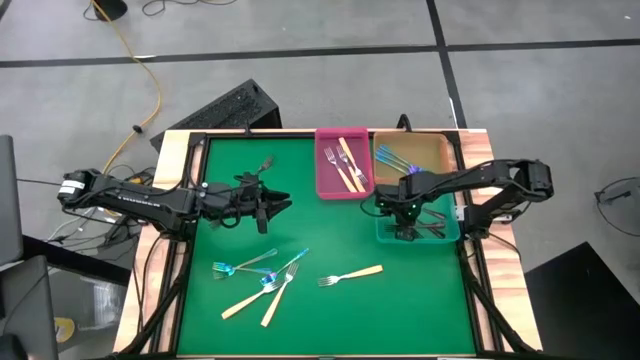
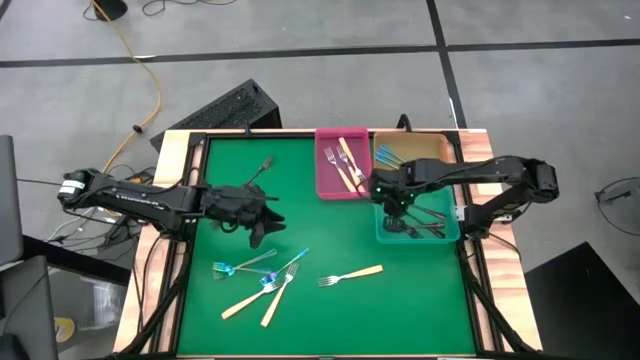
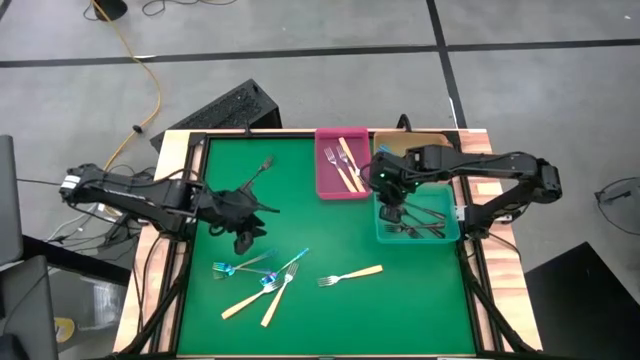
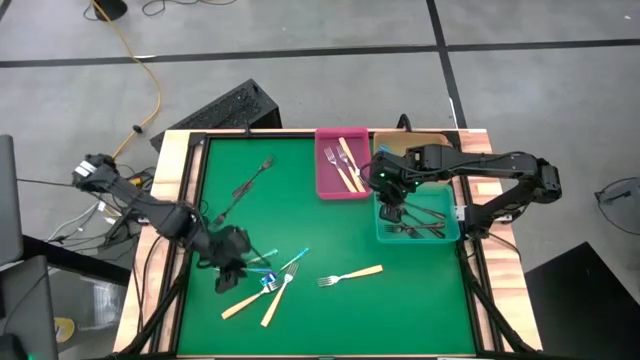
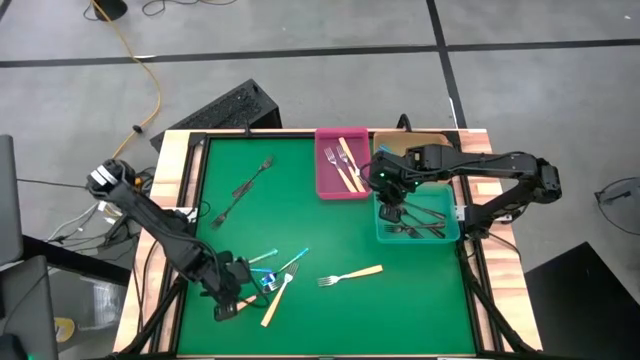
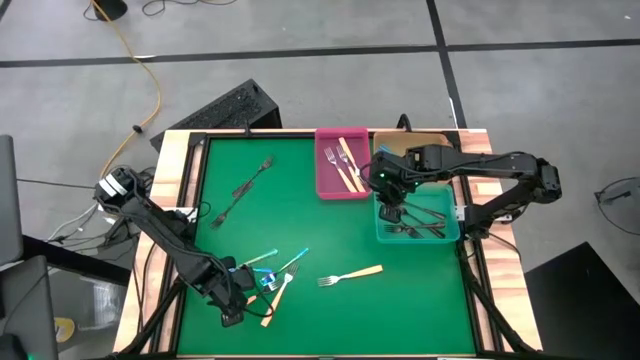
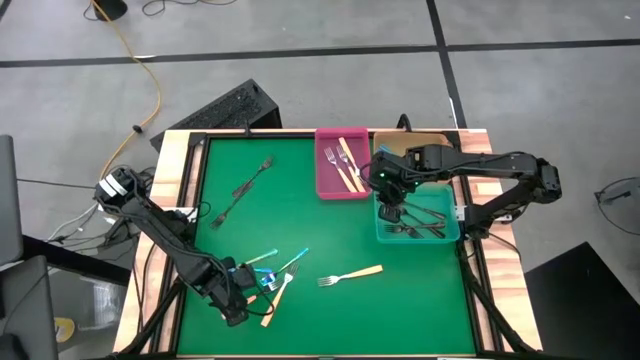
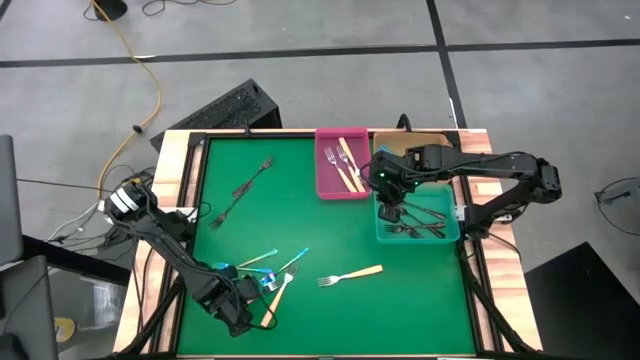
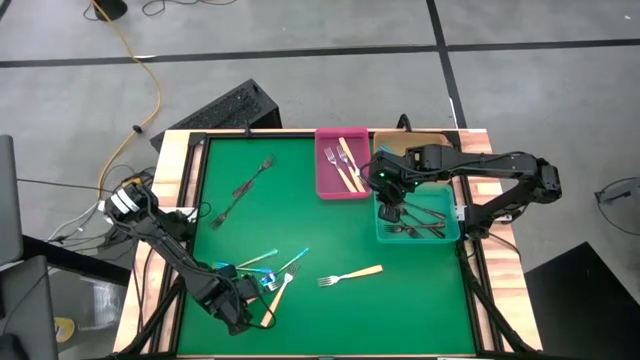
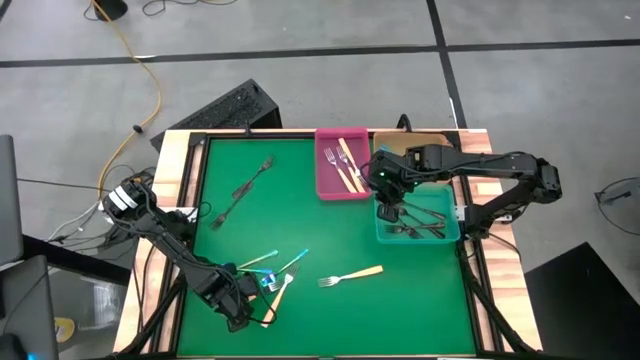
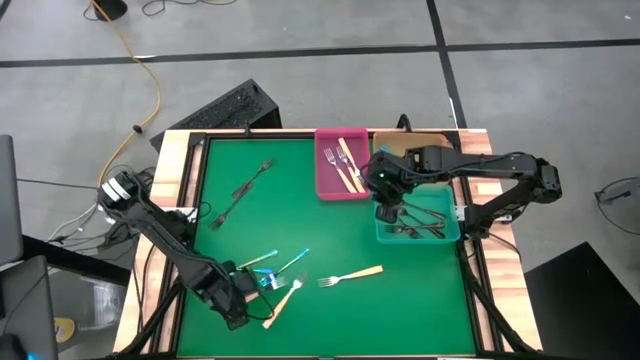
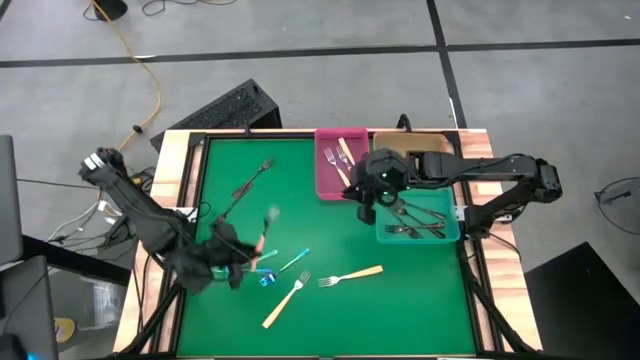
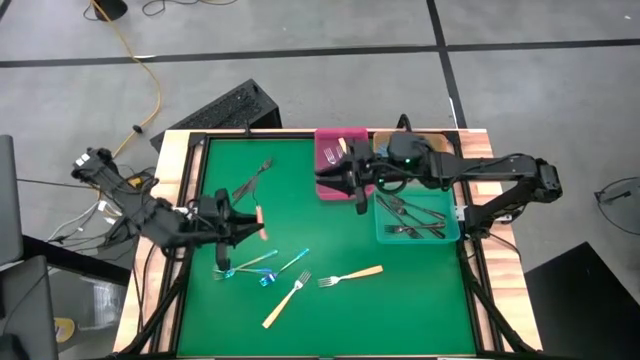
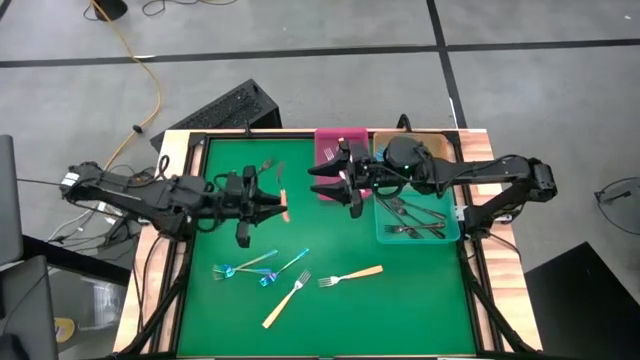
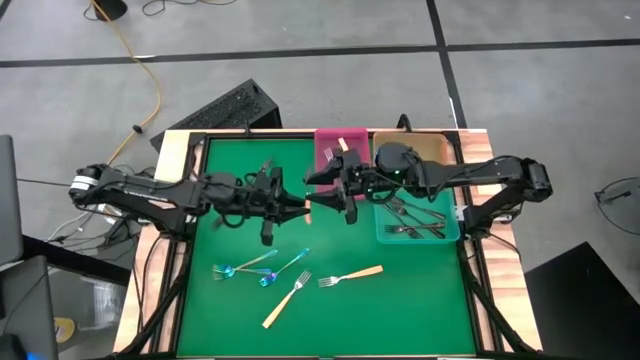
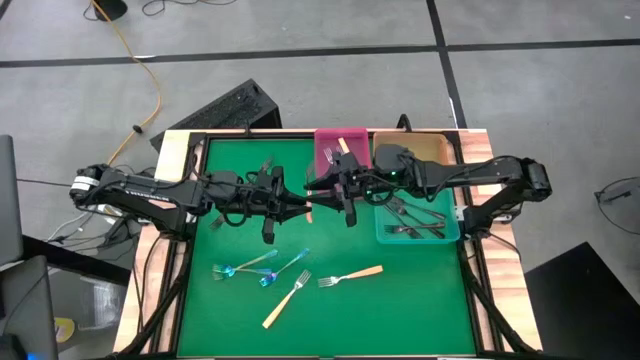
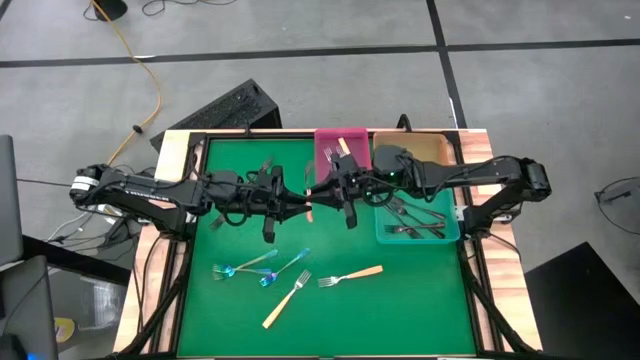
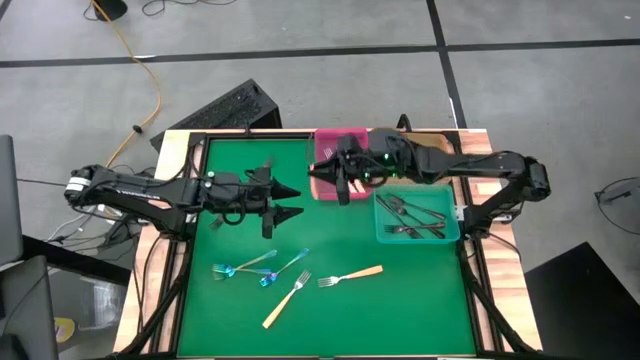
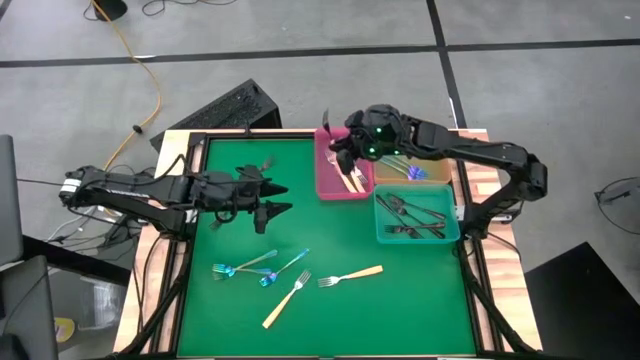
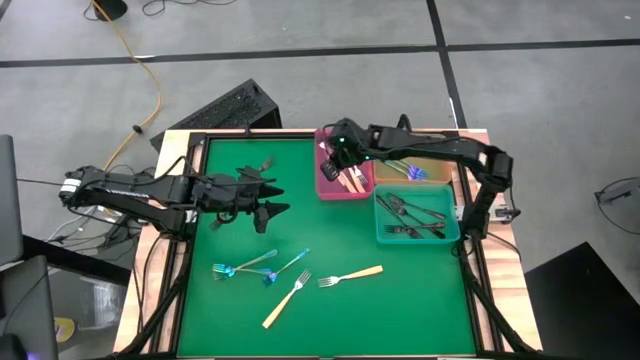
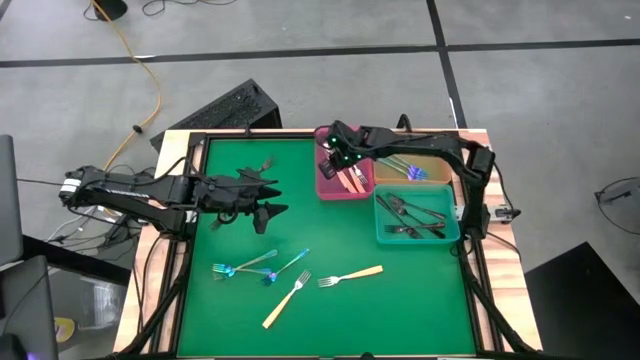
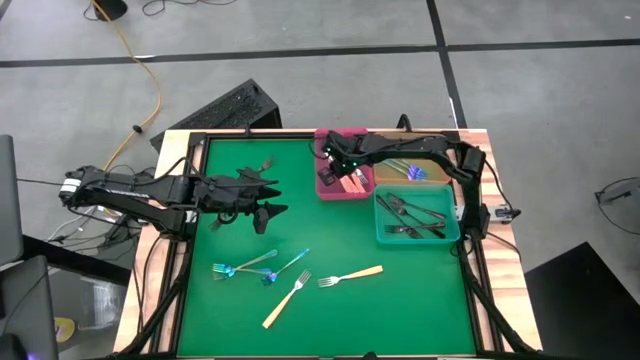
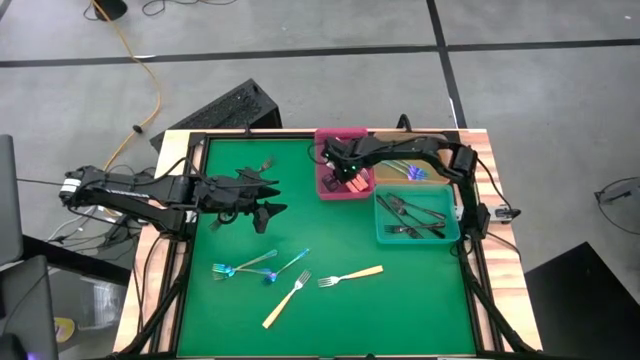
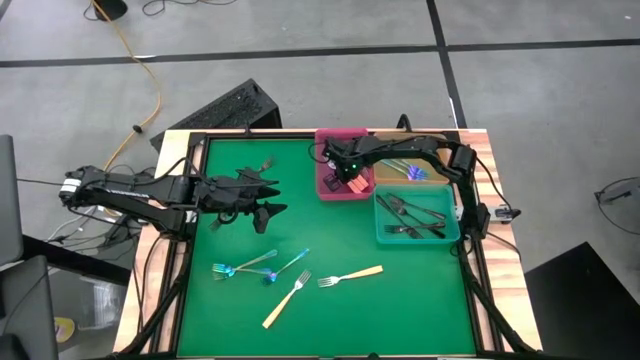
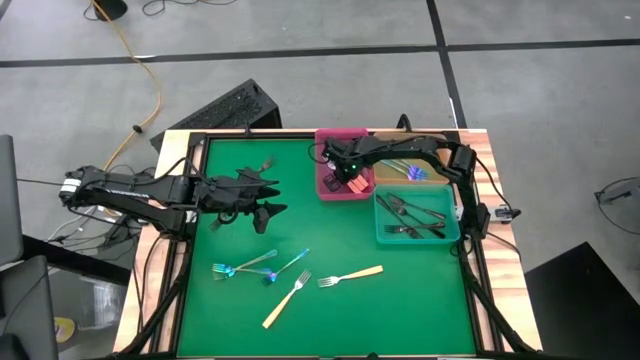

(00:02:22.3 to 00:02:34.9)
Task: Sort silverware by color (type)
Put the yellow fork into the pink bin

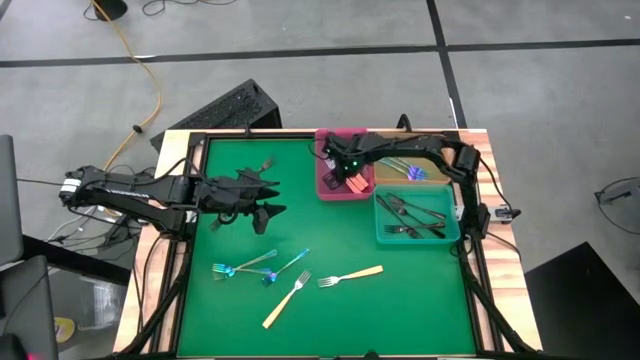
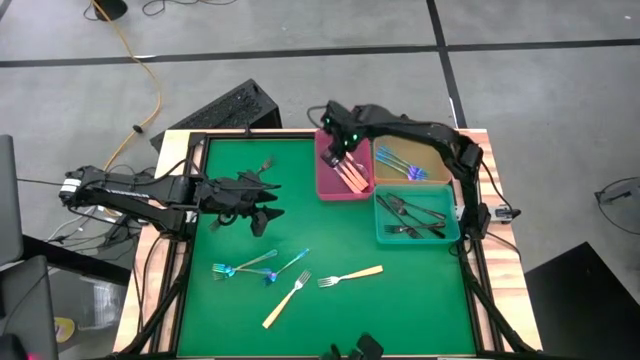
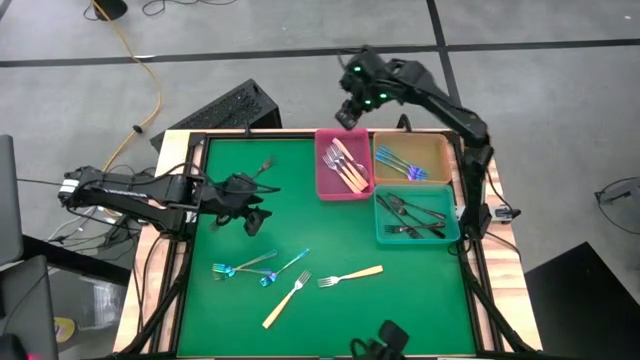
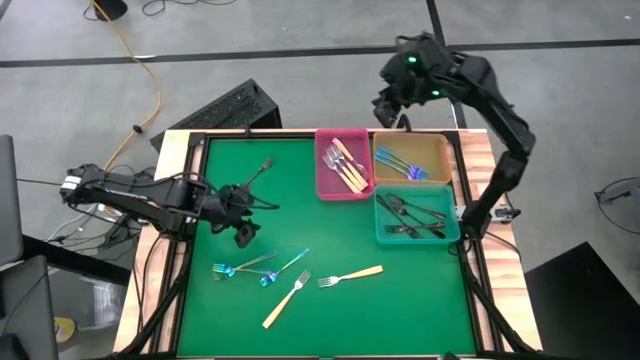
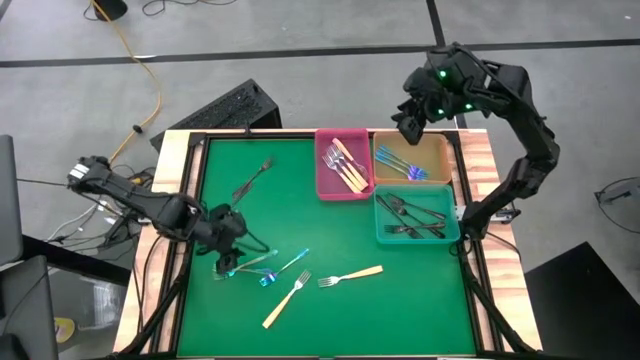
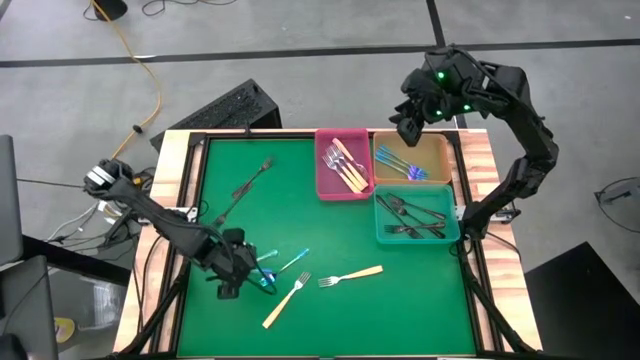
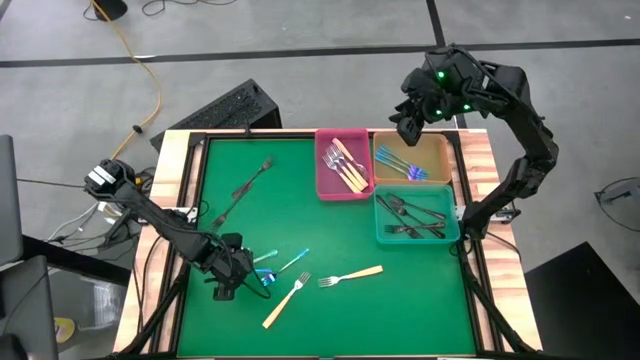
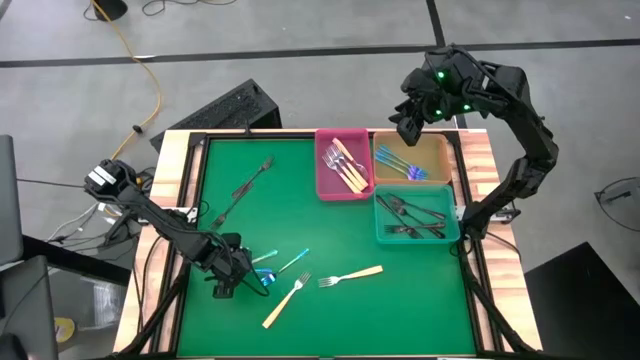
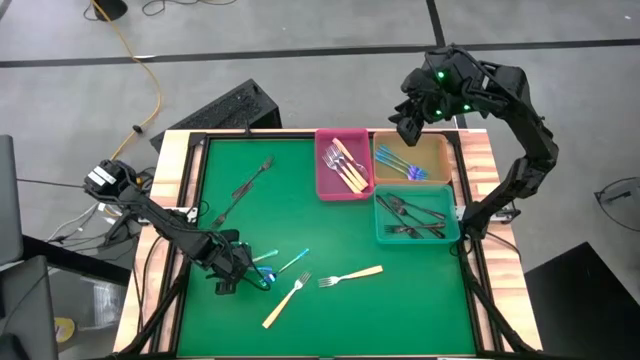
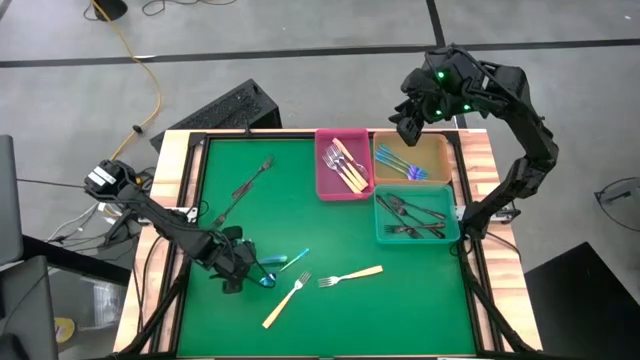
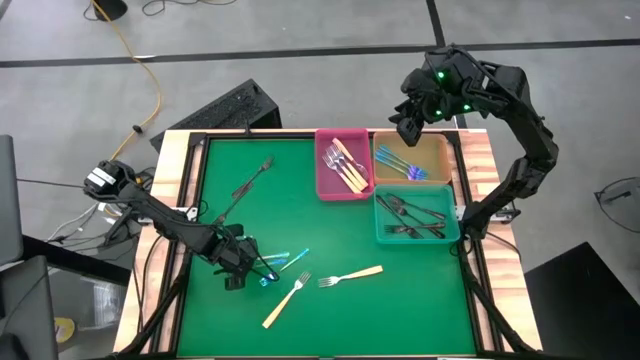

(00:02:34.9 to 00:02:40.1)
Put the blue fork into the orange bin

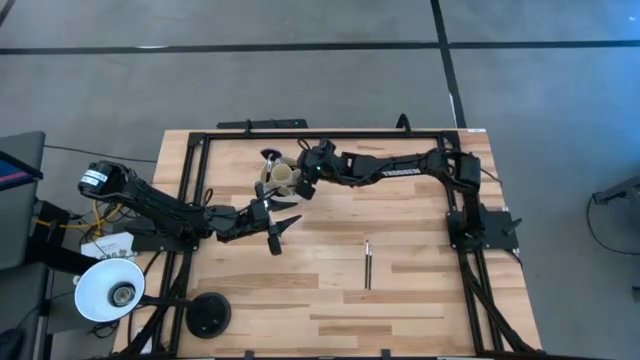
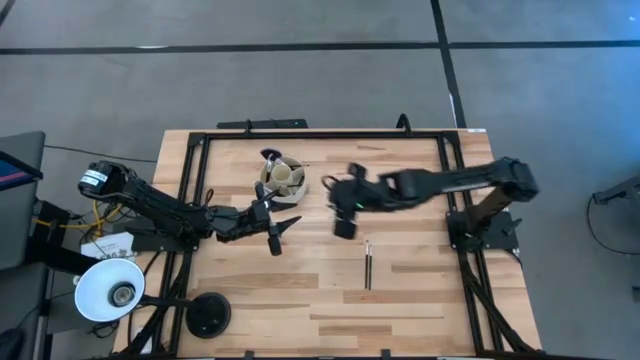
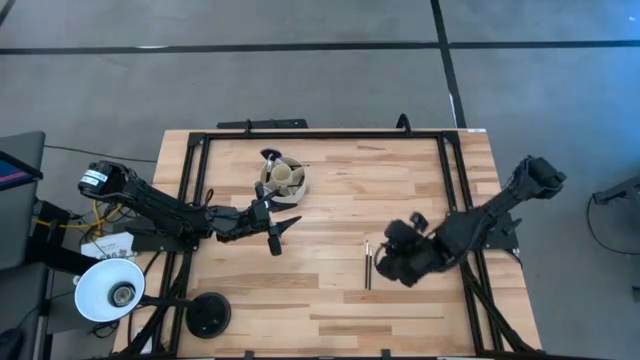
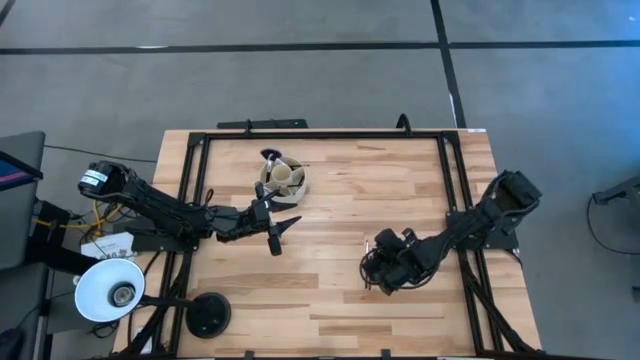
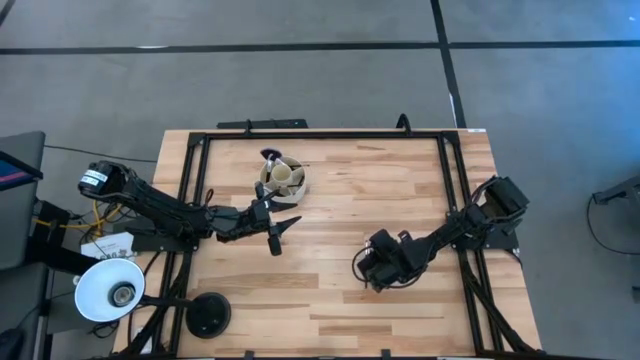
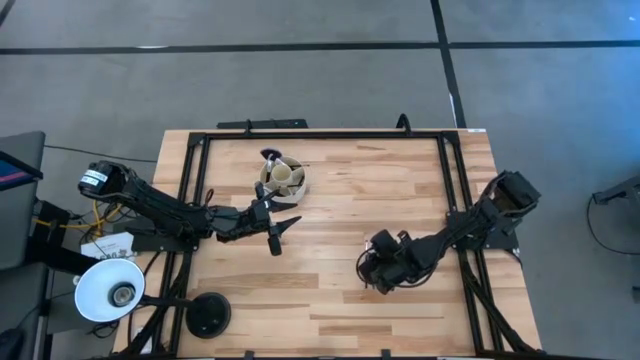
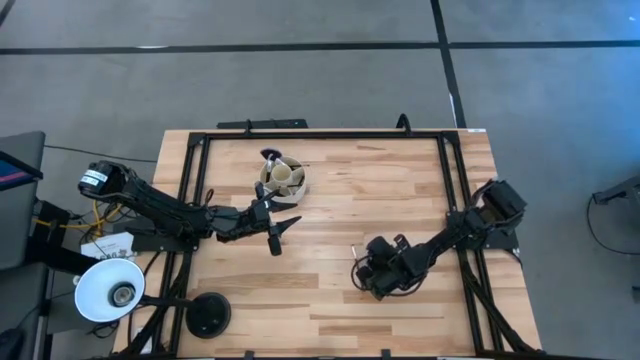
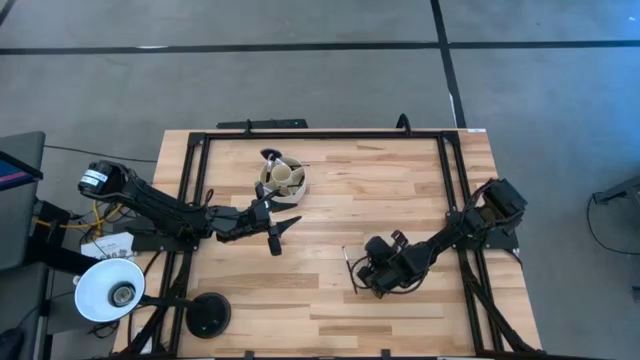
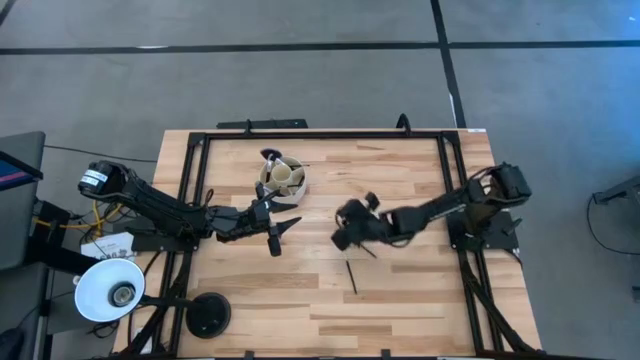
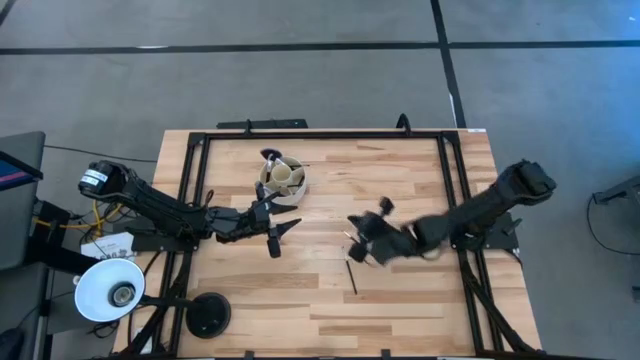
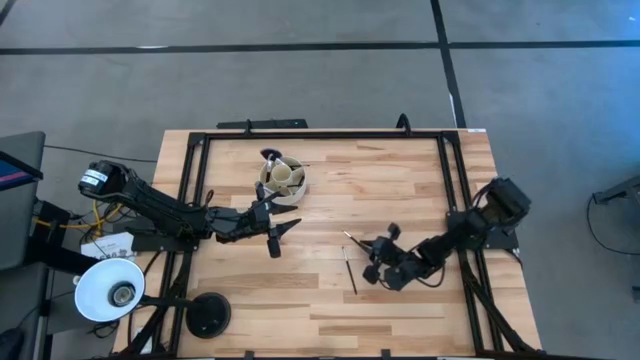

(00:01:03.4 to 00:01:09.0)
Task: Sort items
Put the liner brush in the white organizer
